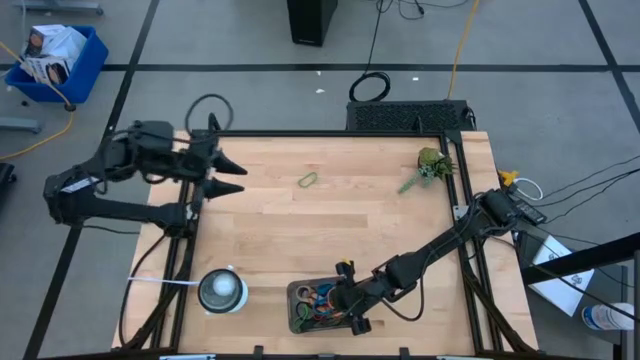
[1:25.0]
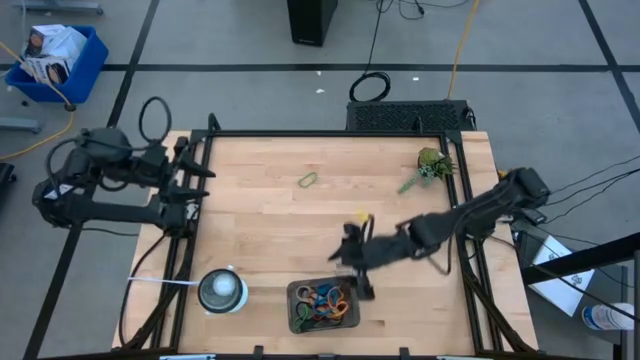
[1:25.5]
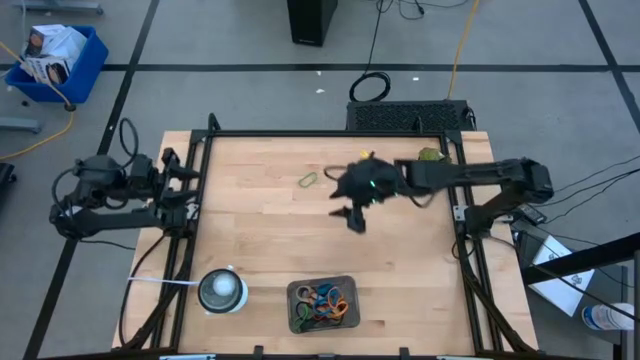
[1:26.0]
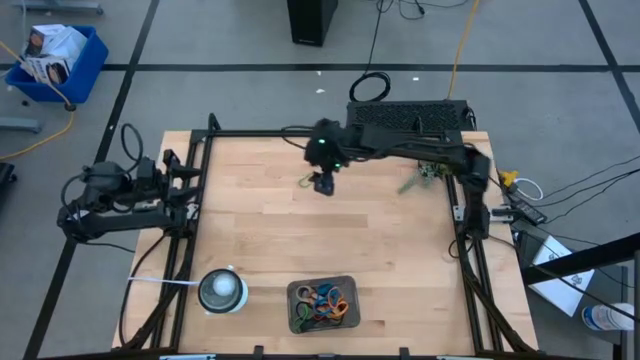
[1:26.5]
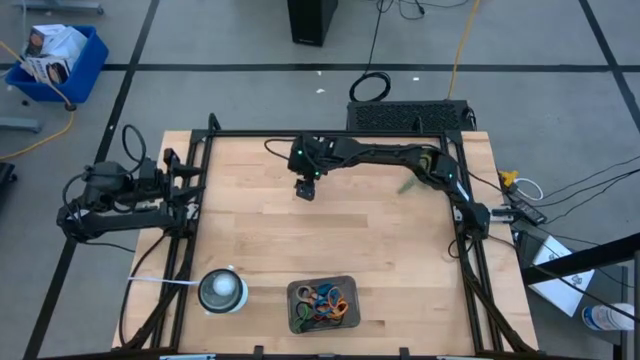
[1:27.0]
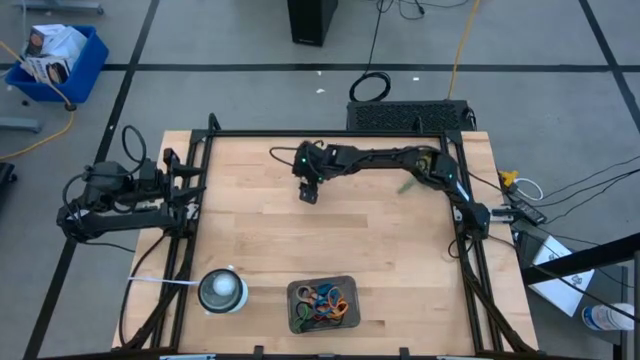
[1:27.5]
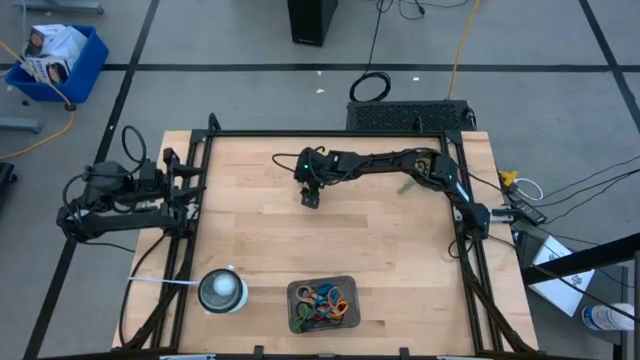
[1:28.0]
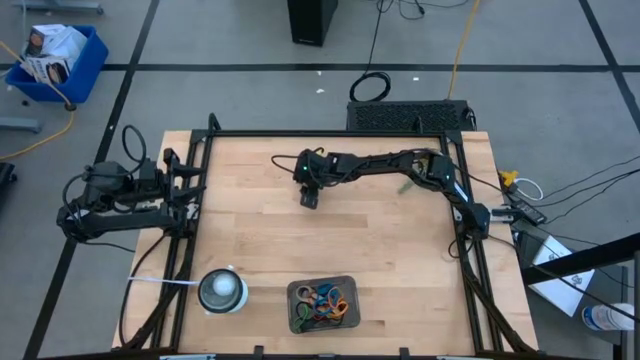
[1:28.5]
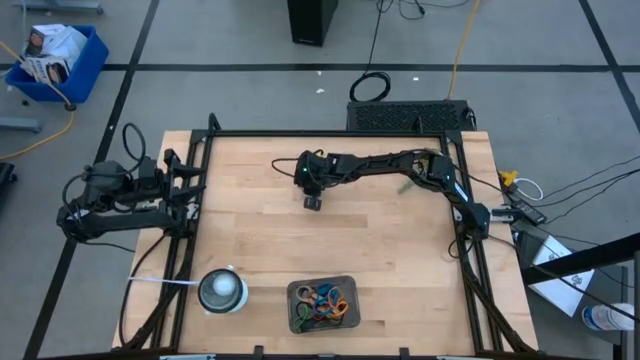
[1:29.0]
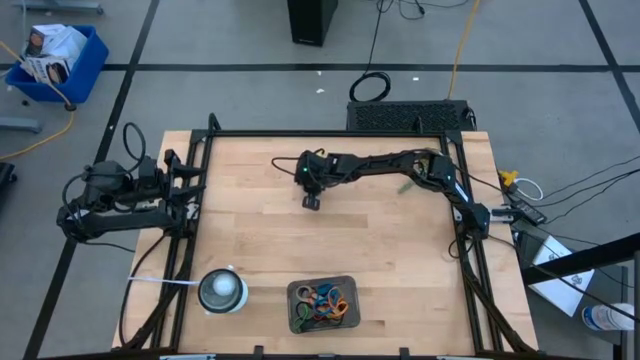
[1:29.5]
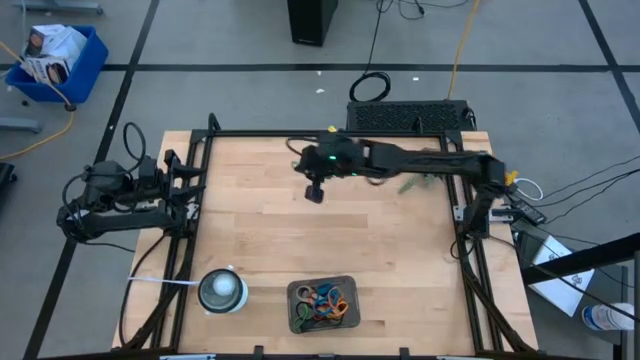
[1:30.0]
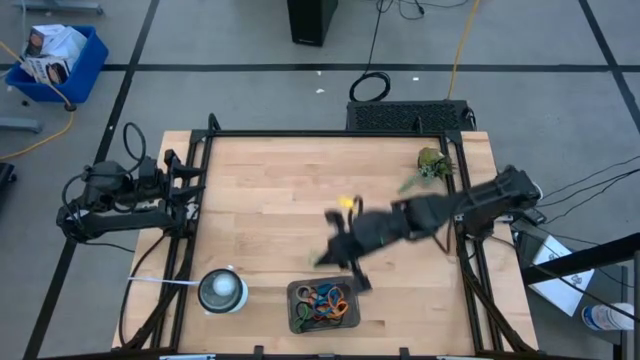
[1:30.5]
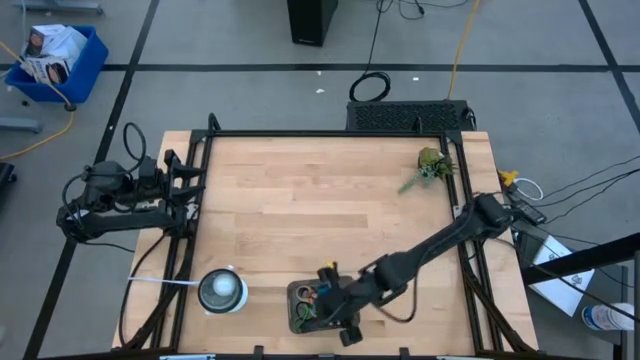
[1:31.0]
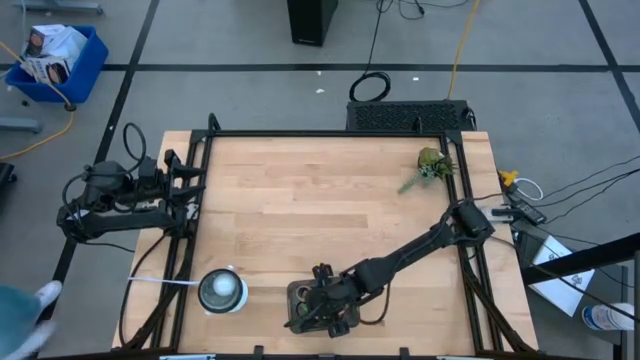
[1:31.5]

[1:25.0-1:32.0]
Task: Pick and place rubber bands into bin
Put the green rubber band into the bin

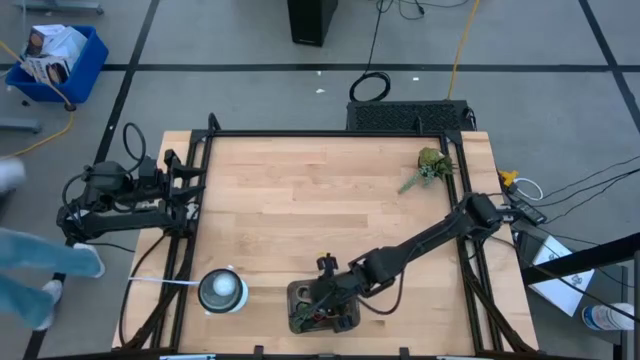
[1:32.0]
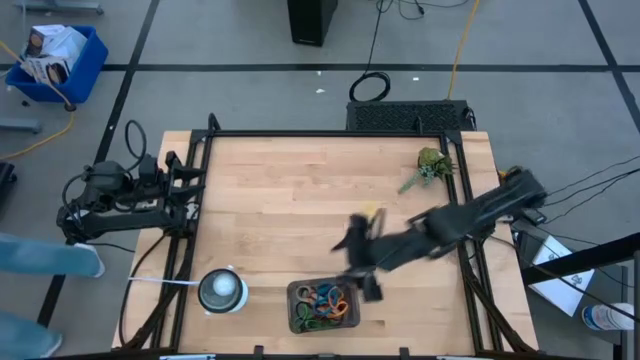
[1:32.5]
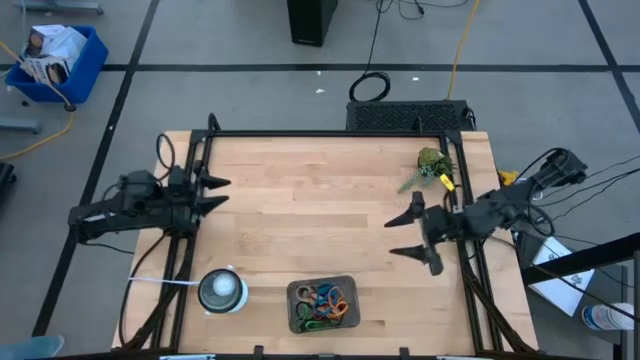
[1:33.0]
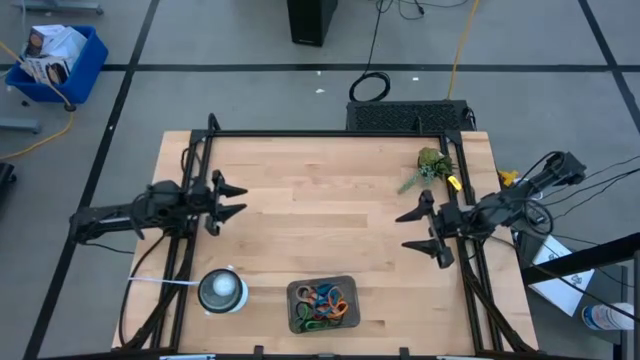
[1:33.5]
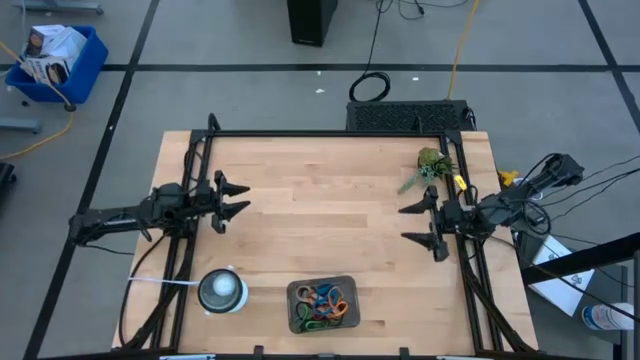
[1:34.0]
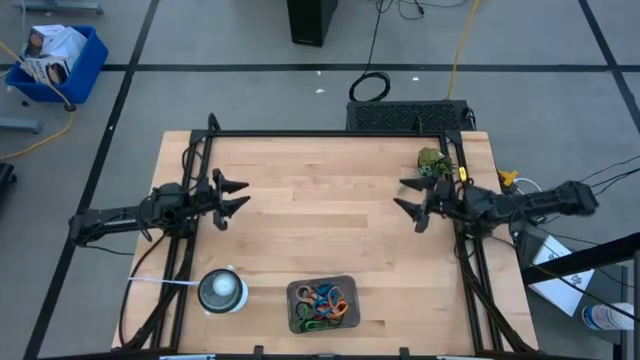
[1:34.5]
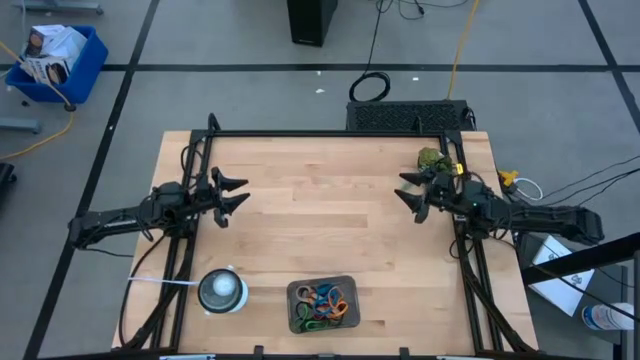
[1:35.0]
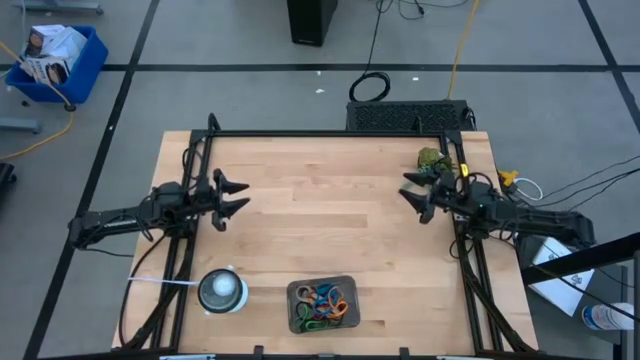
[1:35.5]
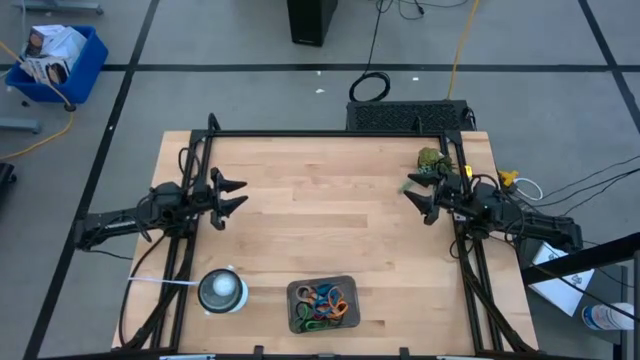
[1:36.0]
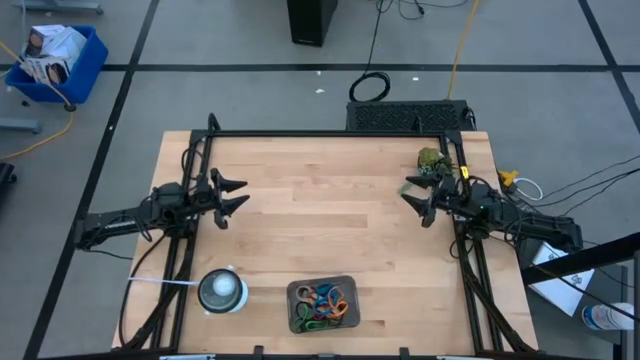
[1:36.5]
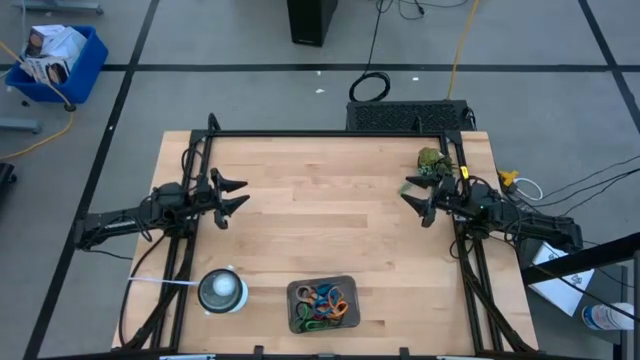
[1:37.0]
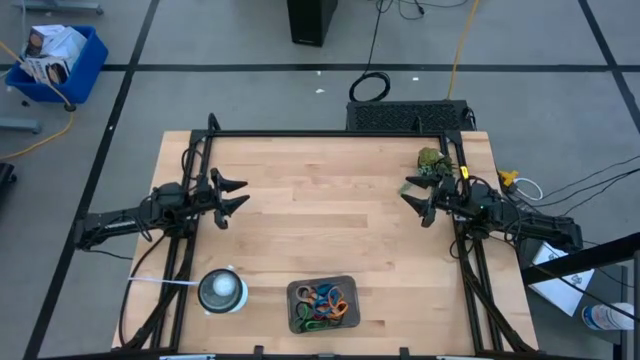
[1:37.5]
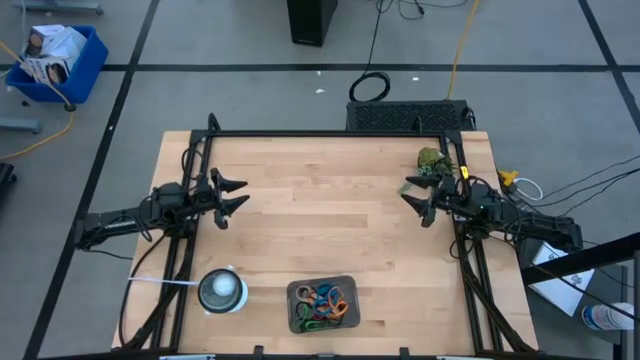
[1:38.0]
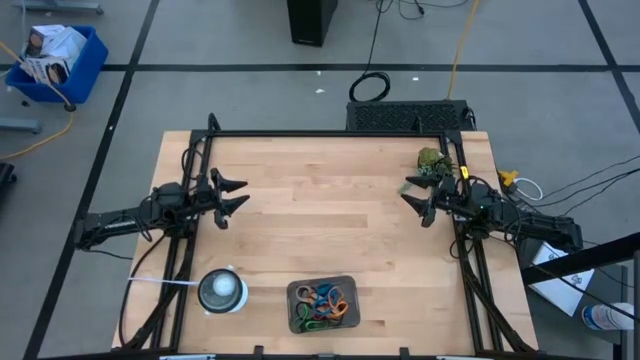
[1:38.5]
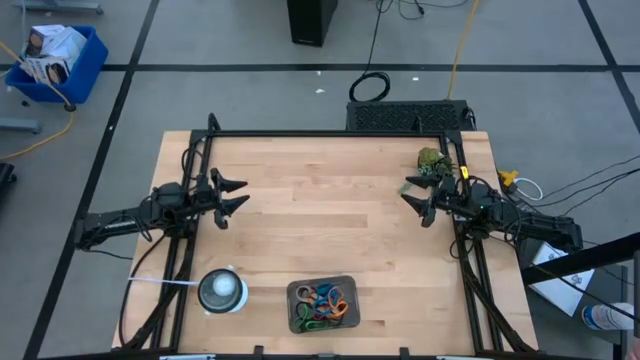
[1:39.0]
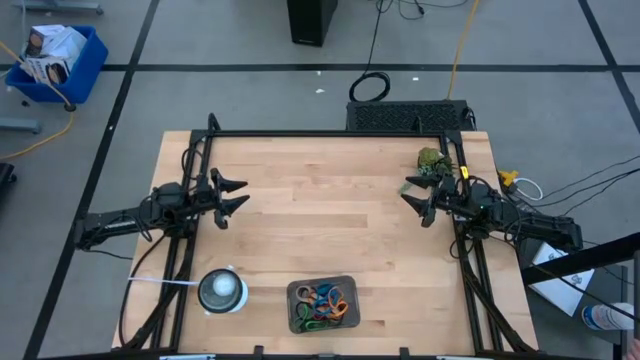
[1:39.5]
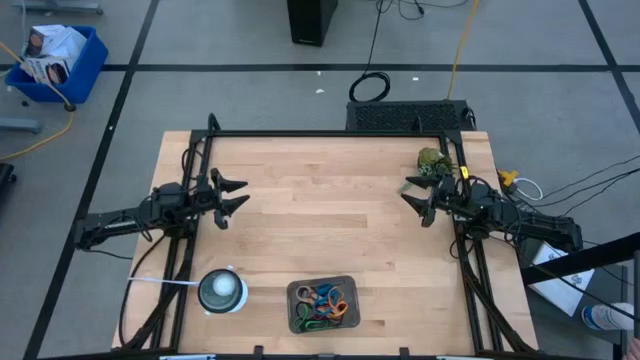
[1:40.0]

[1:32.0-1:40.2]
Return to Home Position

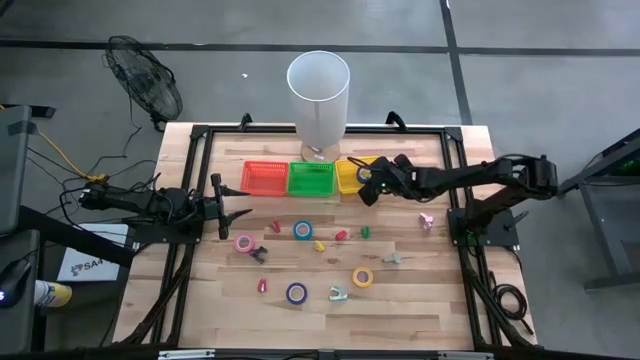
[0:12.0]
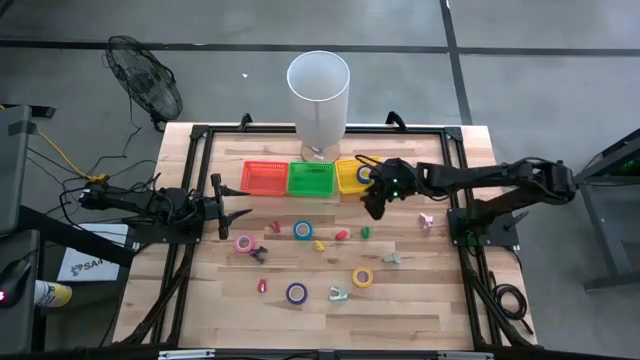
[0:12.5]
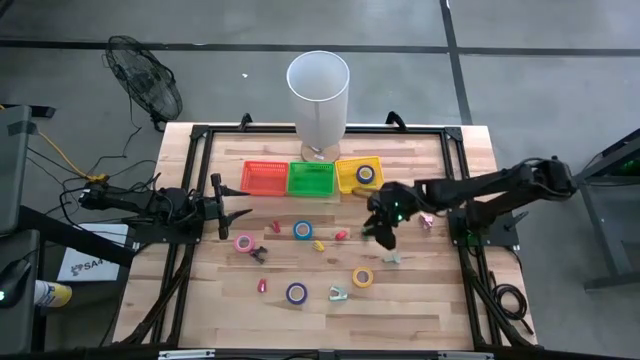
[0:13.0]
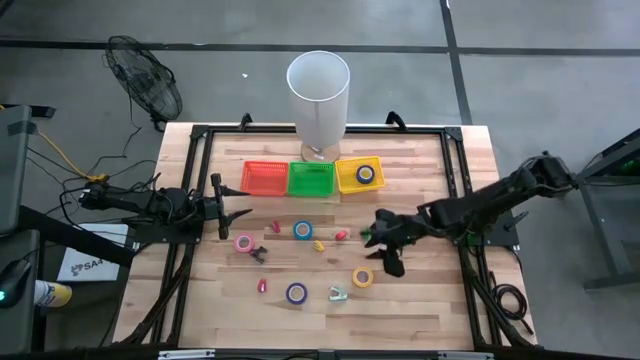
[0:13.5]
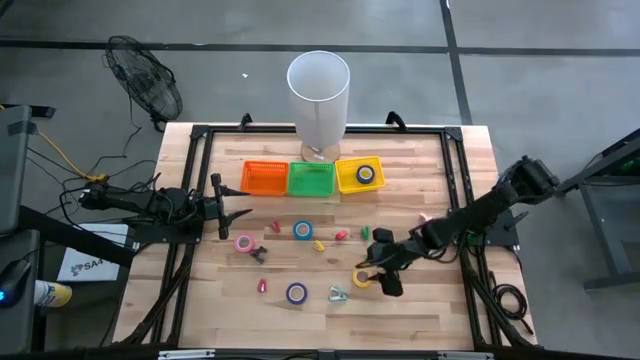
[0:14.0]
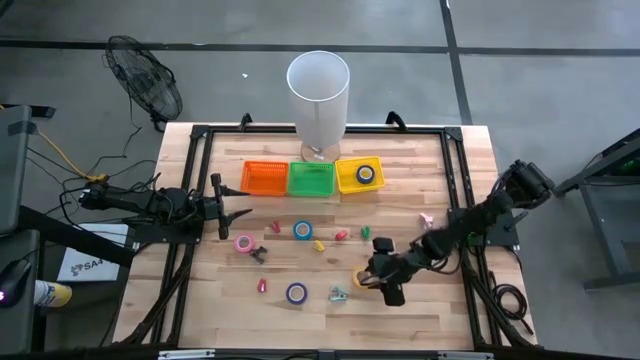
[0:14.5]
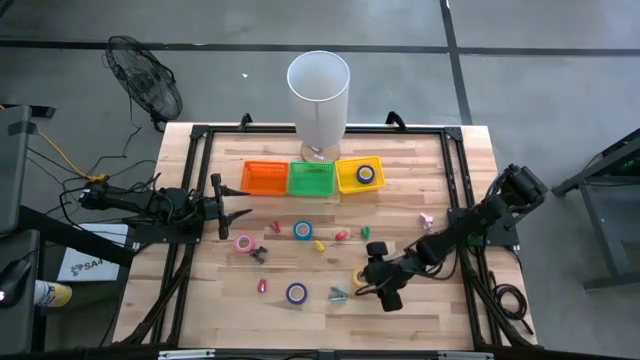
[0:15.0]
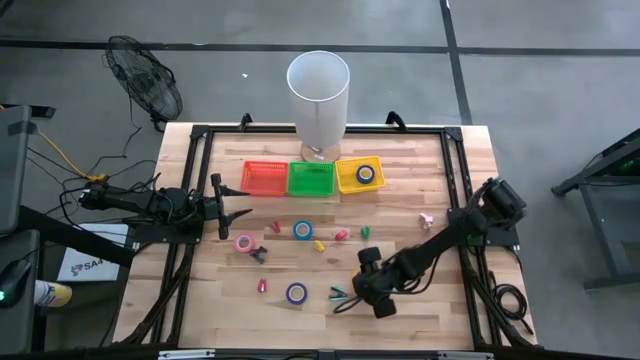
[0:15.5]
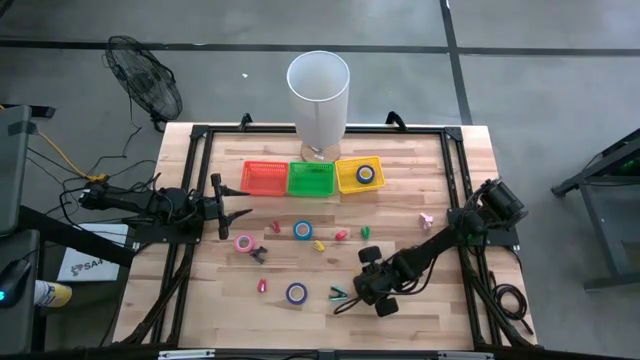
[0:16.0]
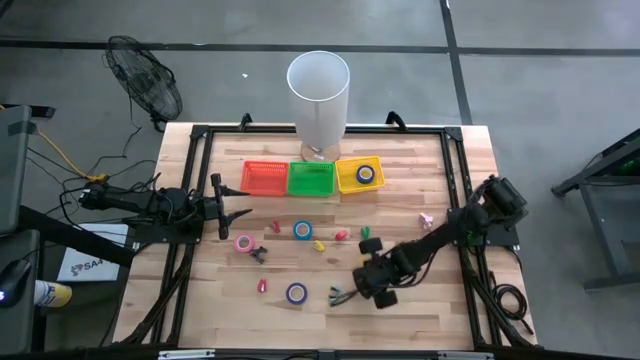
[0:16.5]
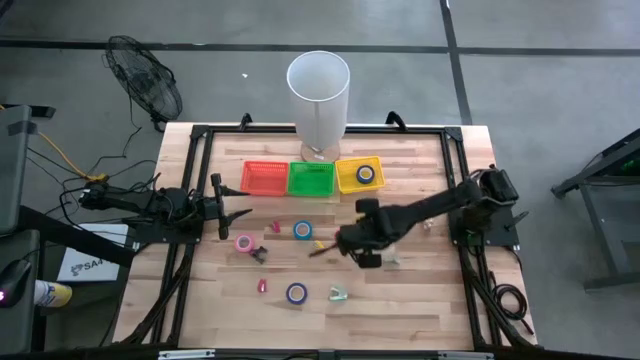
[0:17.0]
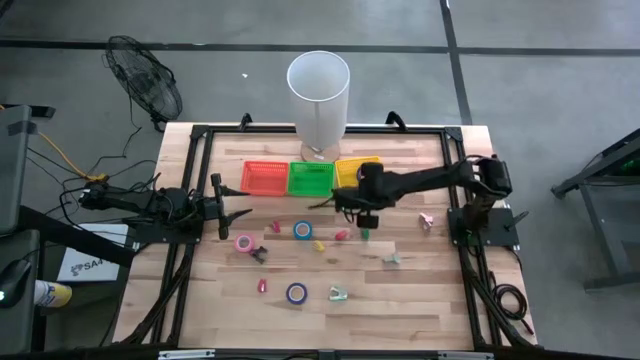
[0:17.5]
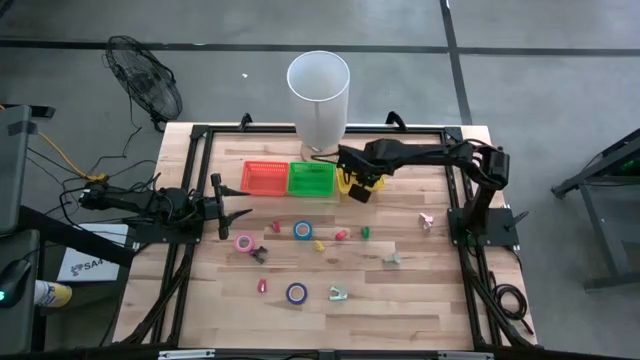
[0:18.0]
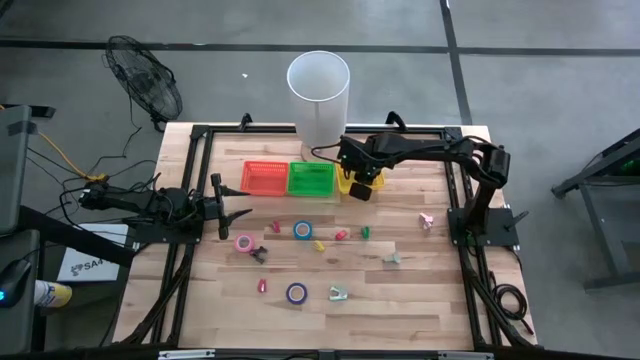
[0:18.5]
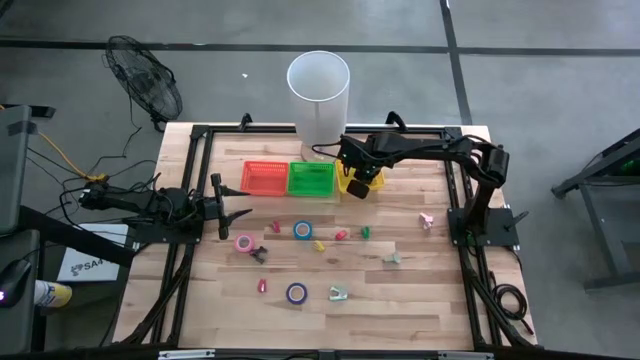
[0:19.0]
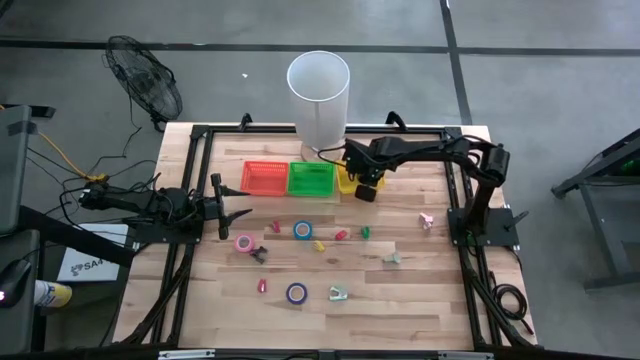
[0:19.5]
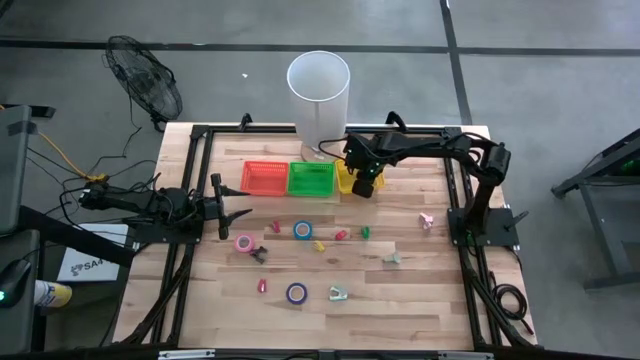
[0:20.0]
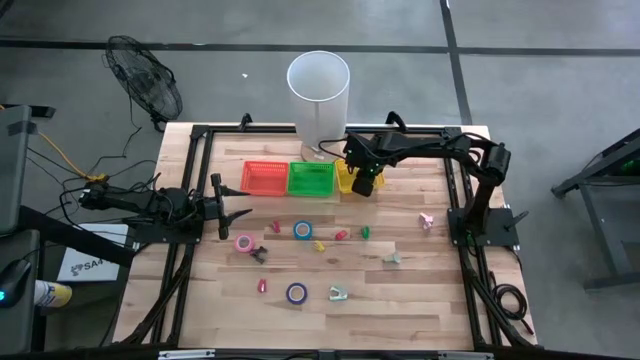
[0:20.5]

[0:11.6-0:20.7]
Task: Pick and place Stapler, Stapler remover, tape
Put the yellow tape into the yellow bin
